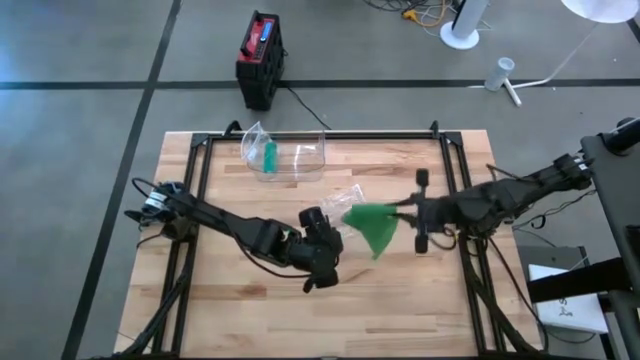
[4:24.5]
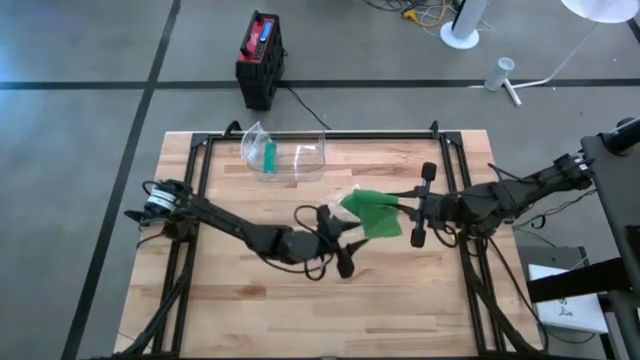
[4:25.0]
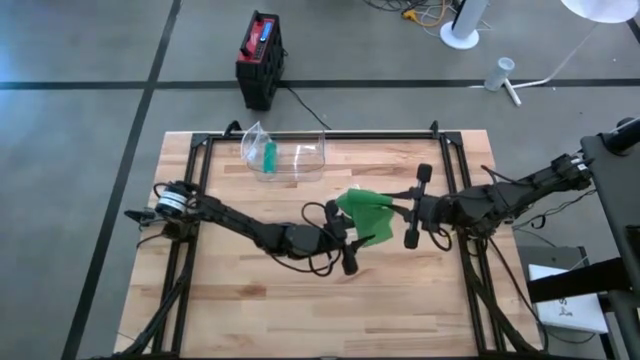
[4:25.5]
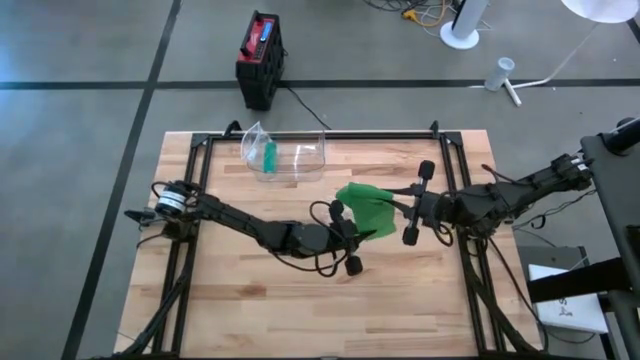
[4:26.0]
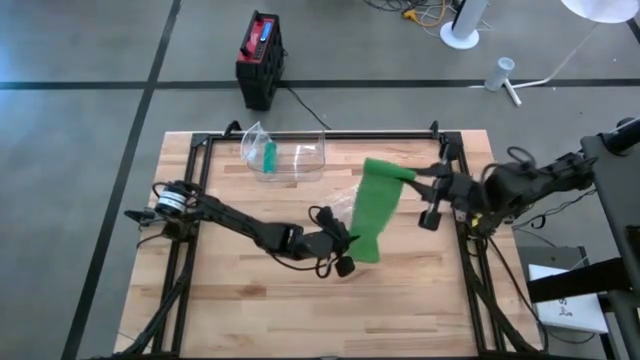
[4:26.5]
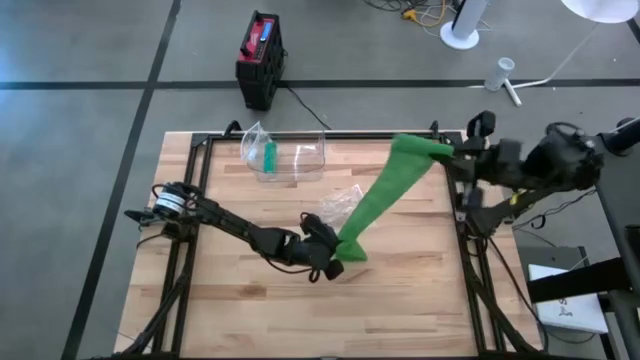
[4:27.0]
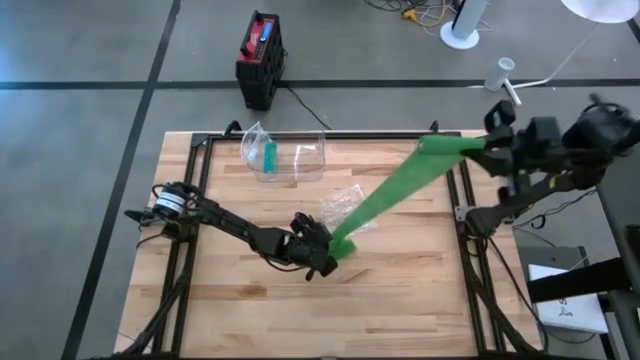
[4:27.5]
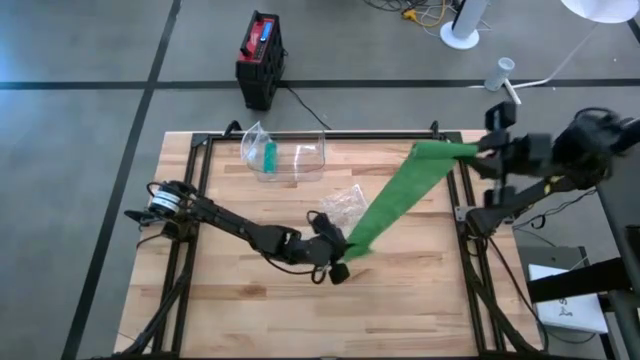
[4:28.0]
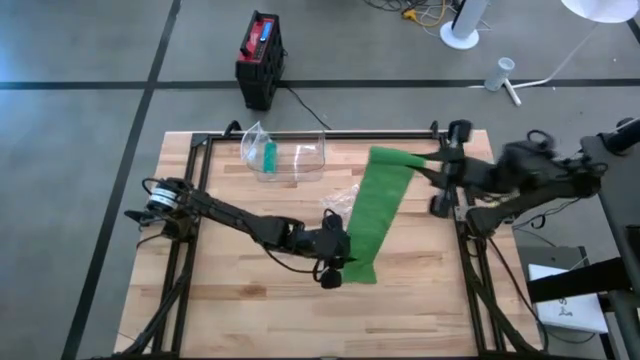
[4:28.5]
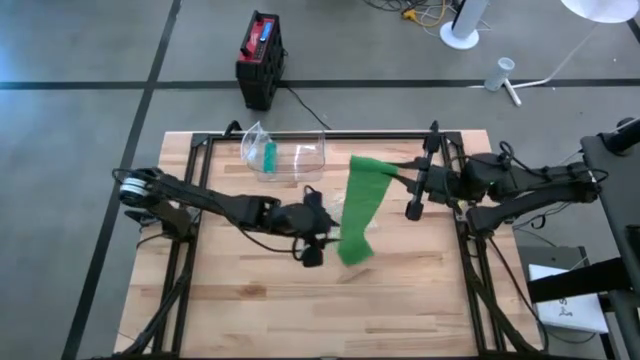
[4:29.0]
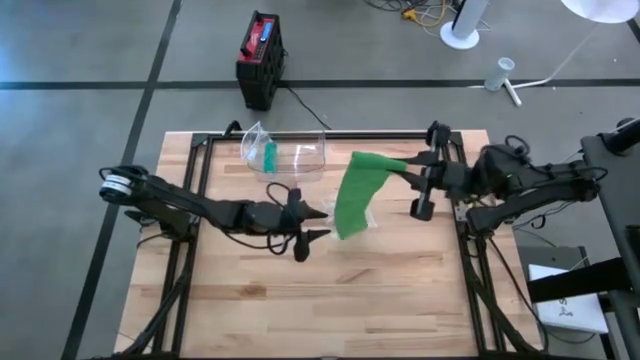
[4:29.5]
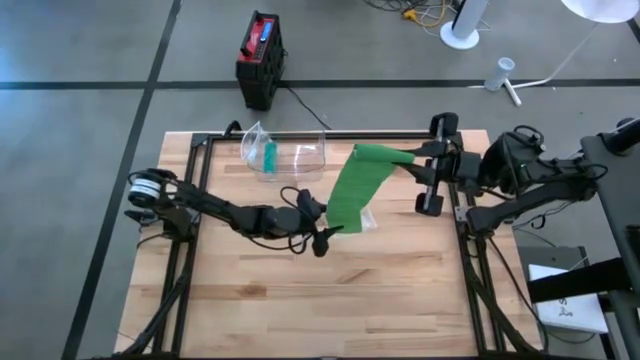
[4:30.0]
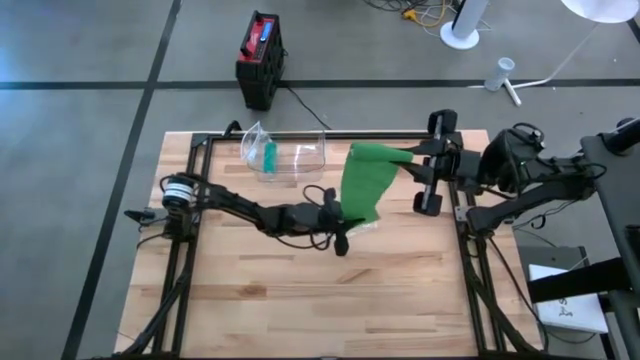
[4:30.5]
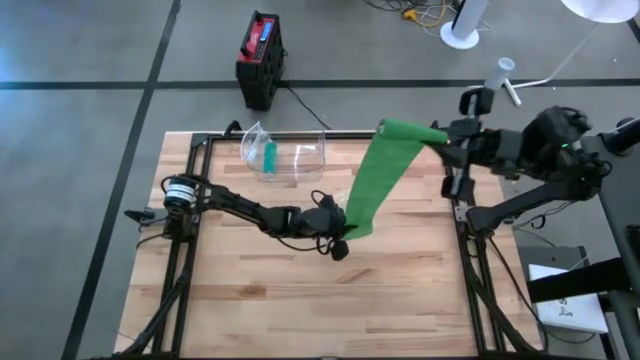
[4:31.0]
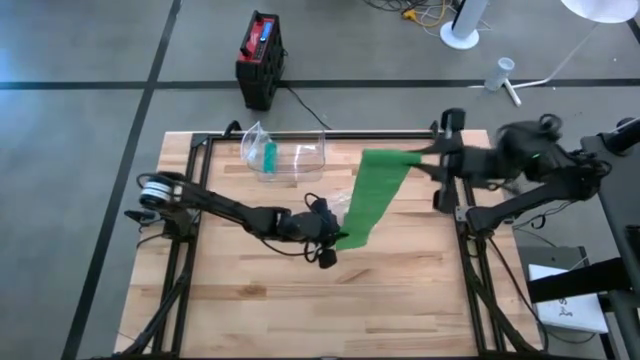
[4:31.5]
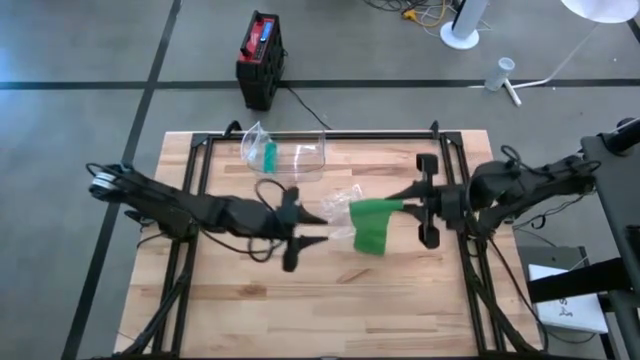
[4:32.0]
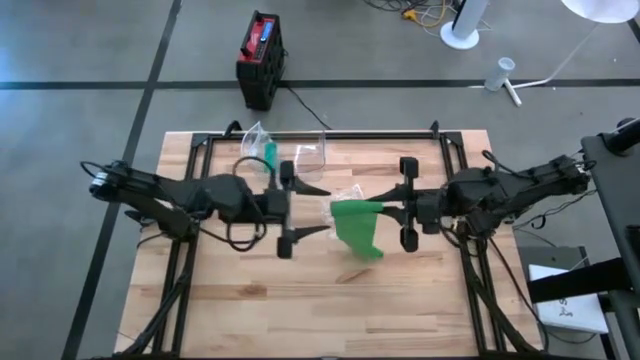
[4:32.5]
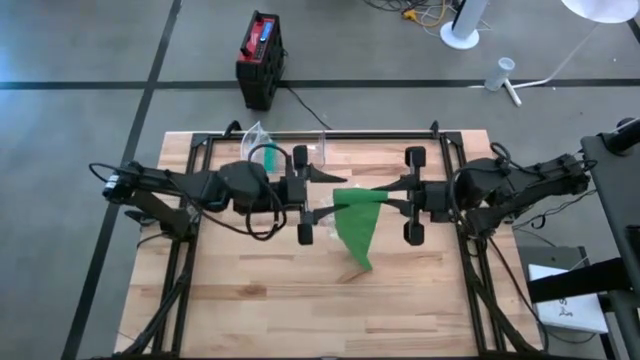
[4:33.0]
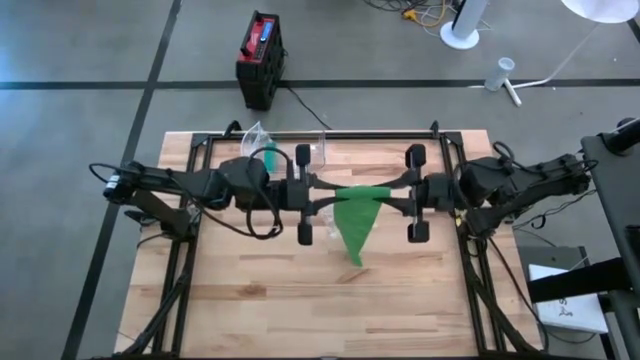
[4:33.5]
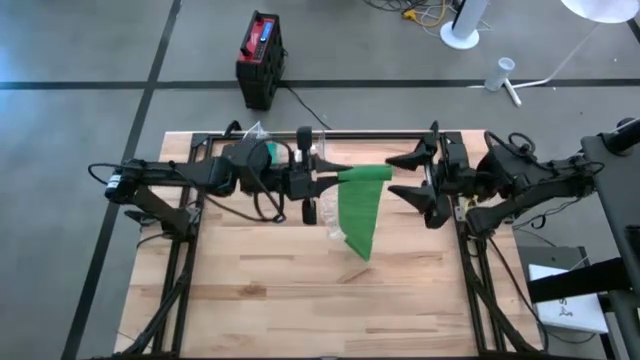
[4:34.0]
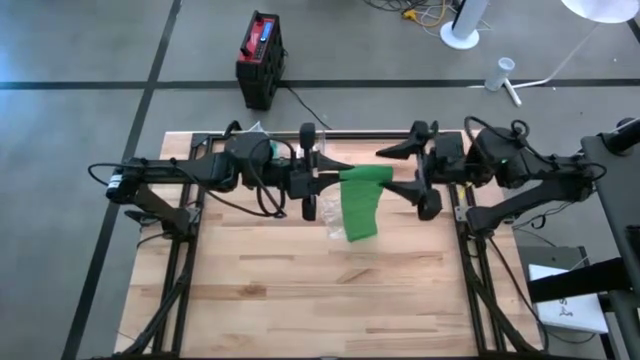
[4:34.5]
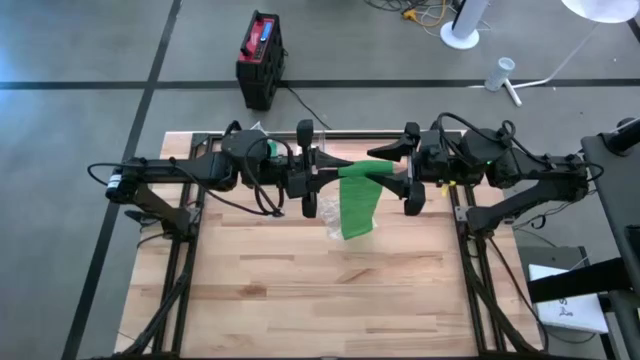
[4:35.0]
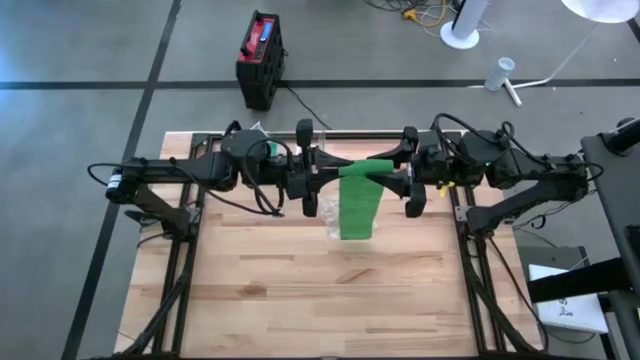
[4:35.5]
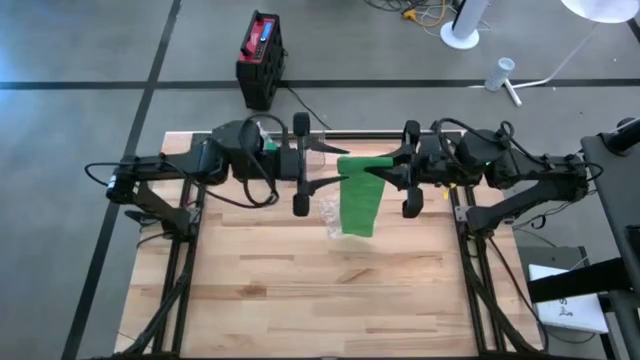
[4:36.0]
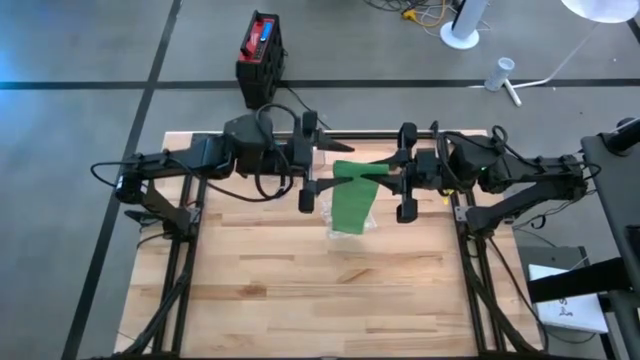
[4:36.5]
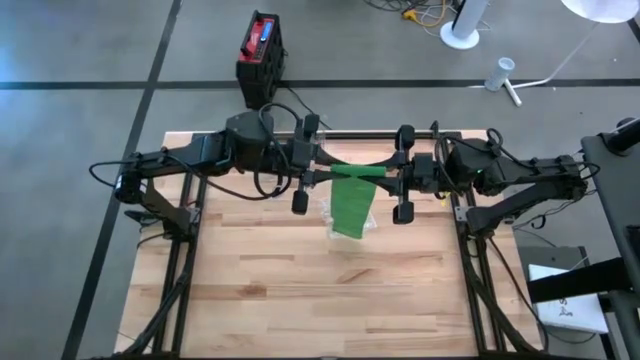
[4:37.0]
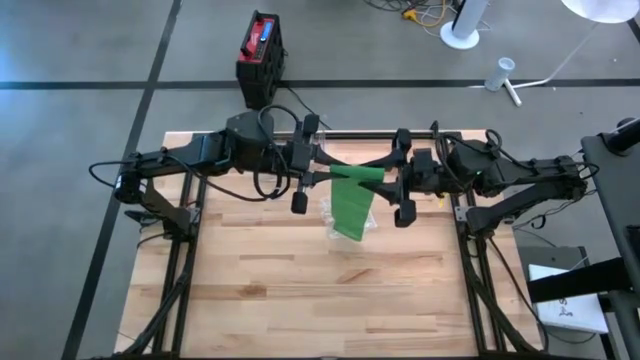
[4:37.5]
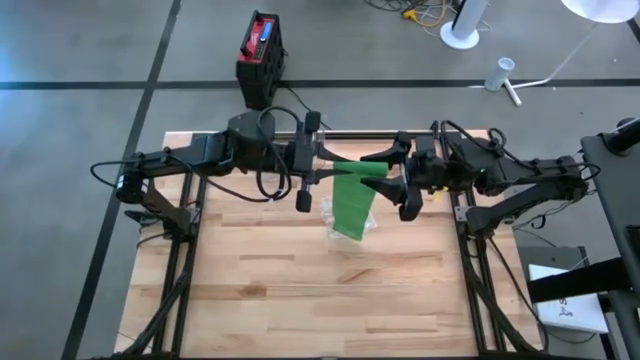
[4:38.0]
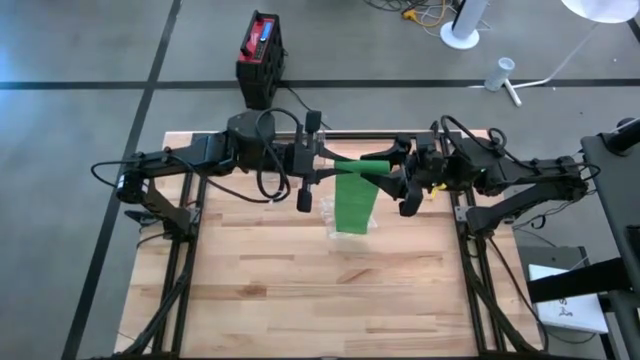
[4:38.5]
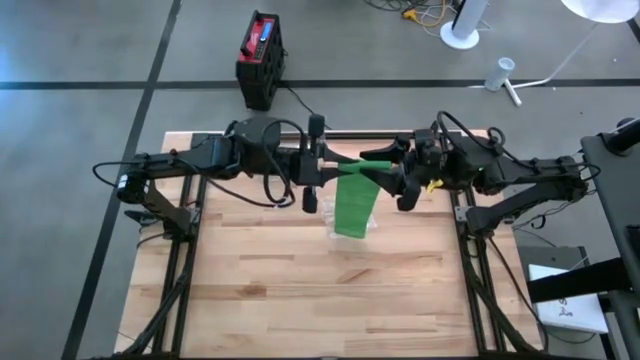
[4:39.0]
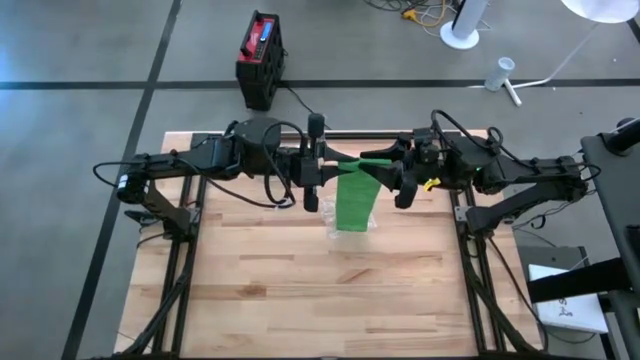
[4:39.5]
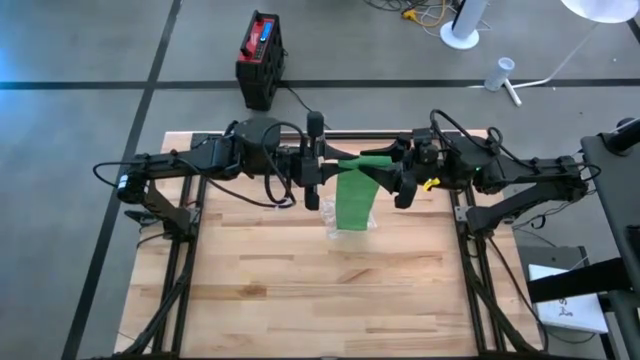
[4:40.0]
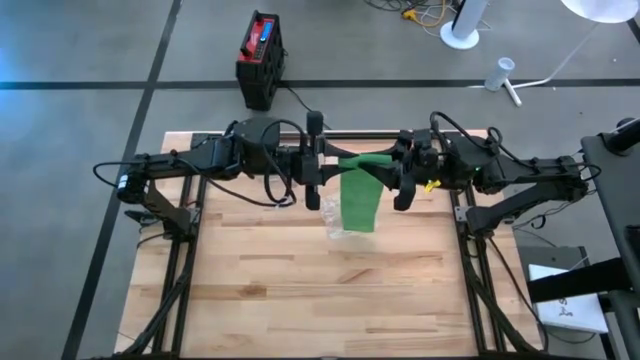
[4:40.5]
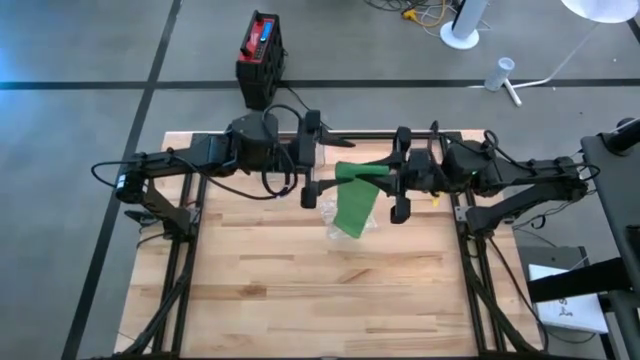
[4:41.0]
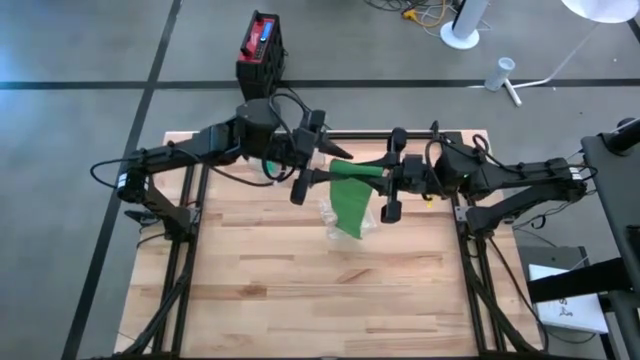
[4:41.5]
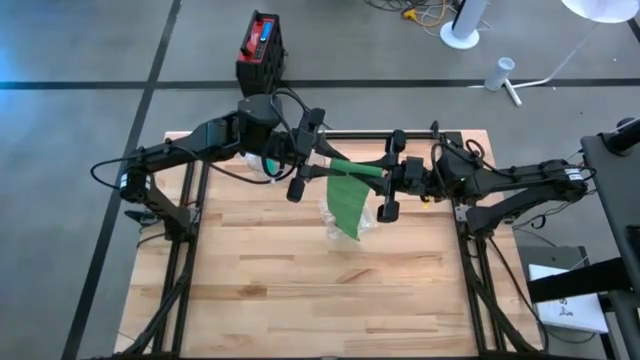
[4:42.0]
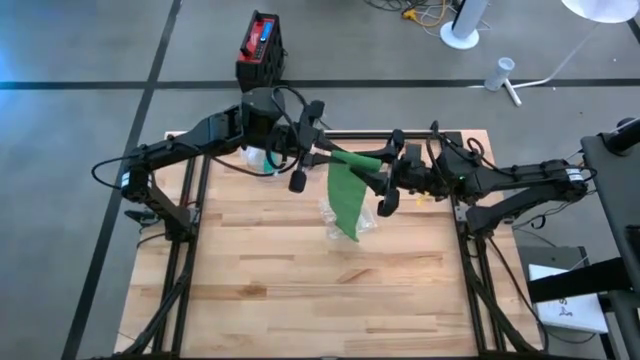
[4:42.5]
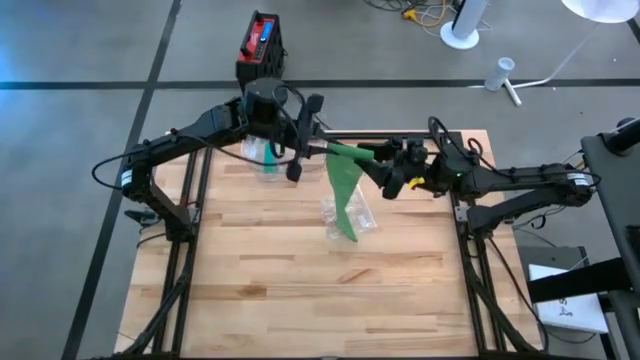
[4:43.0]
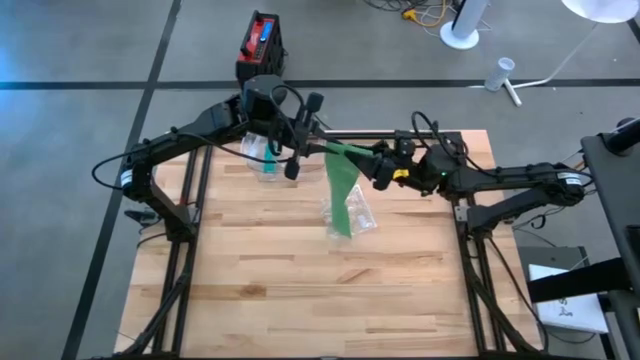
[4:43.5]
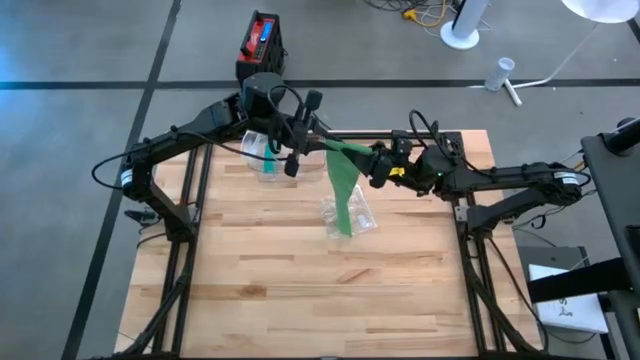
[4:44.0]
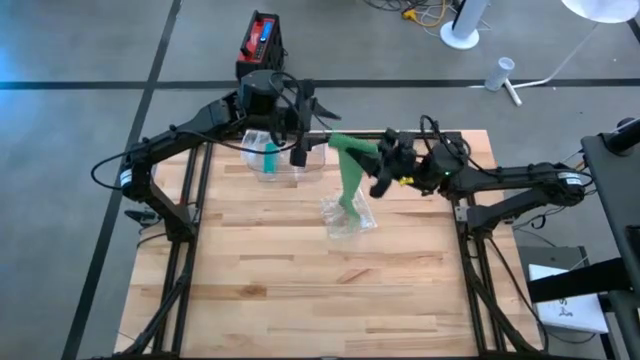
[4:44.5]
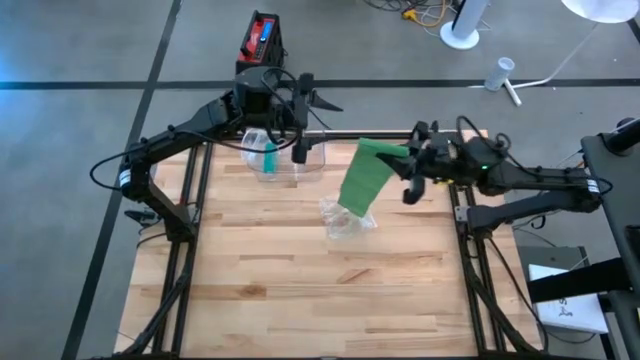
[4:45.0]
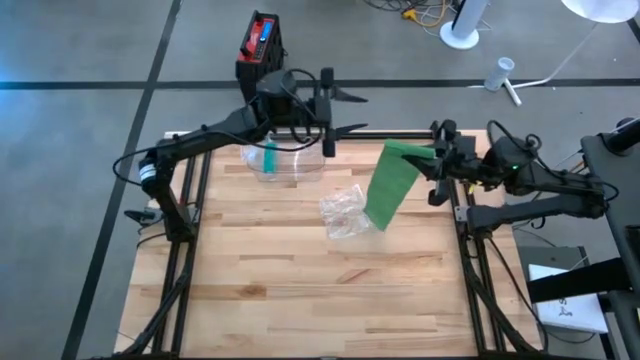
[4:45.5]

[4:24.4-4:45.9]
Task: Roll bandage
Roll the green bandage
